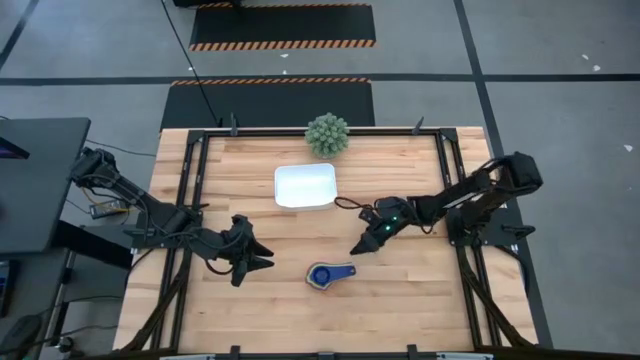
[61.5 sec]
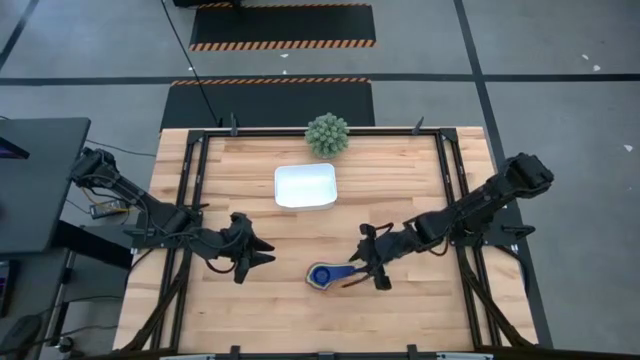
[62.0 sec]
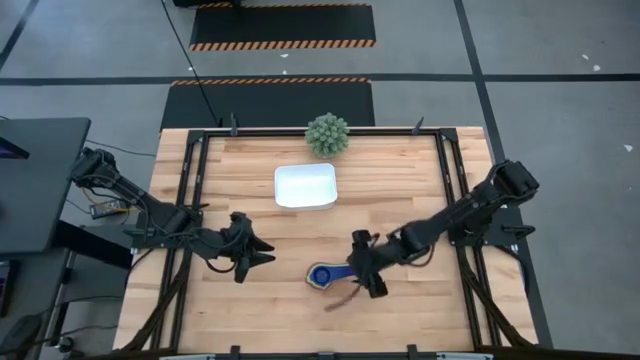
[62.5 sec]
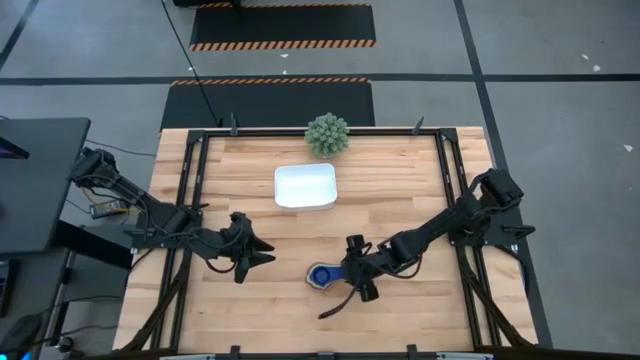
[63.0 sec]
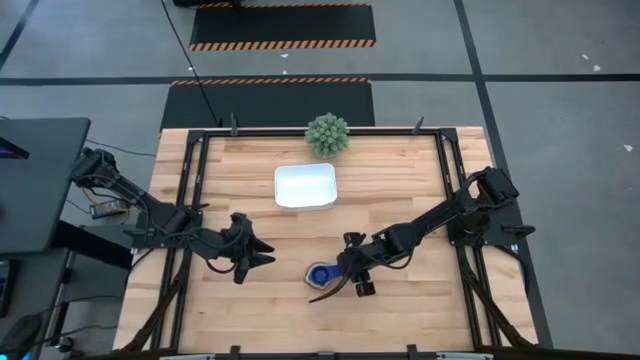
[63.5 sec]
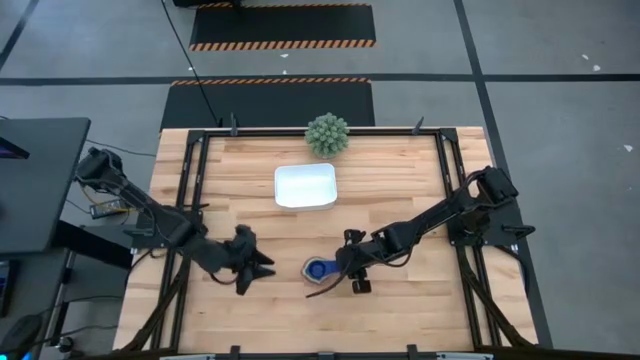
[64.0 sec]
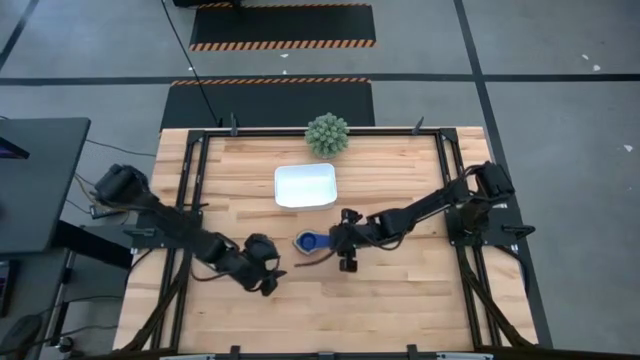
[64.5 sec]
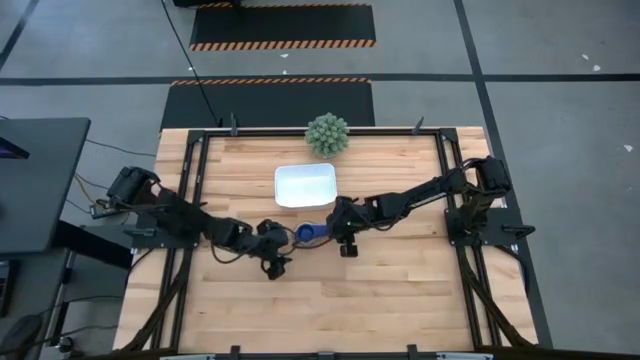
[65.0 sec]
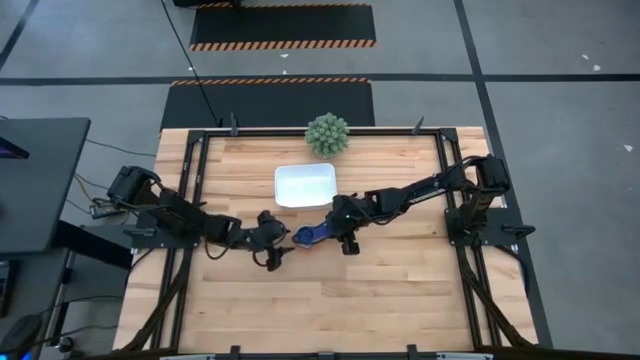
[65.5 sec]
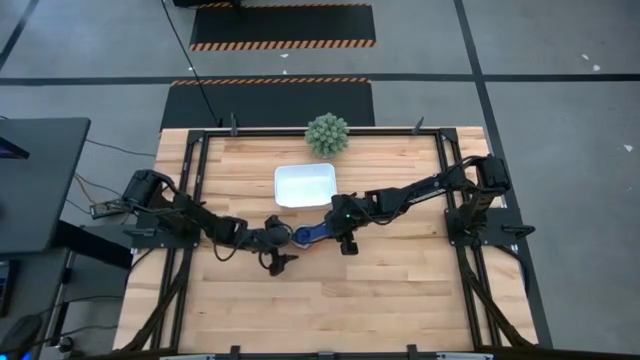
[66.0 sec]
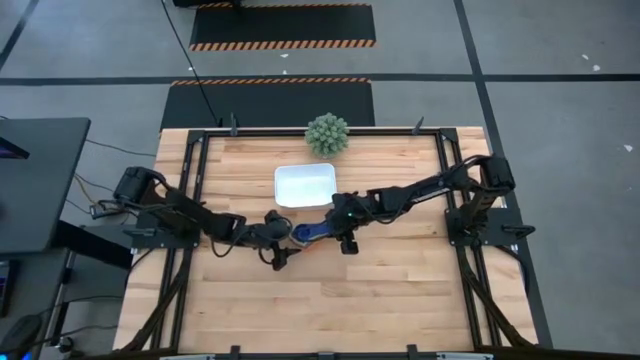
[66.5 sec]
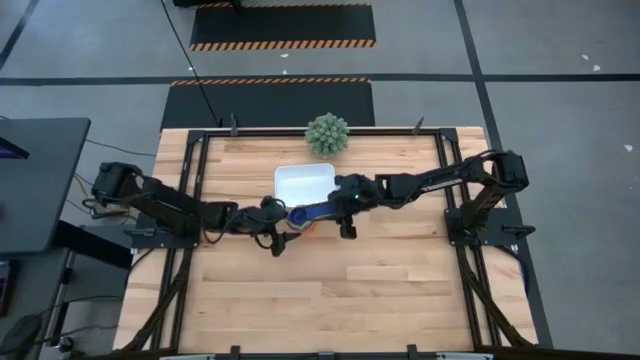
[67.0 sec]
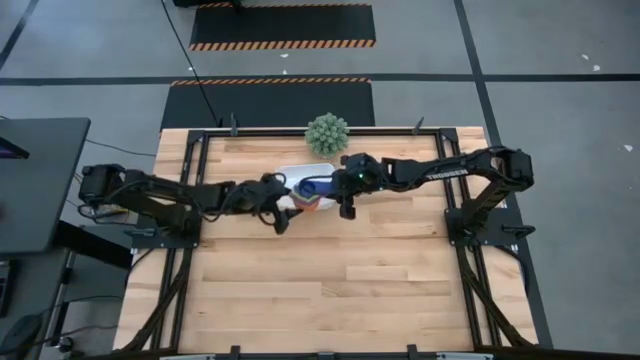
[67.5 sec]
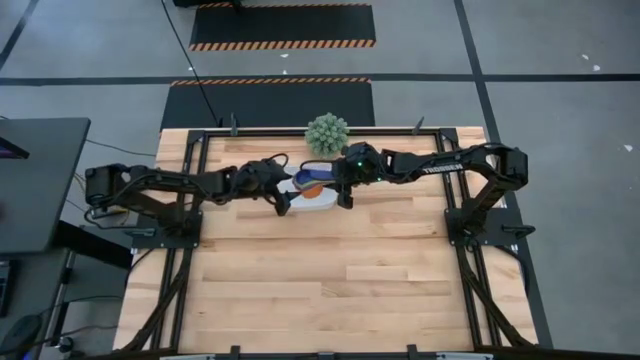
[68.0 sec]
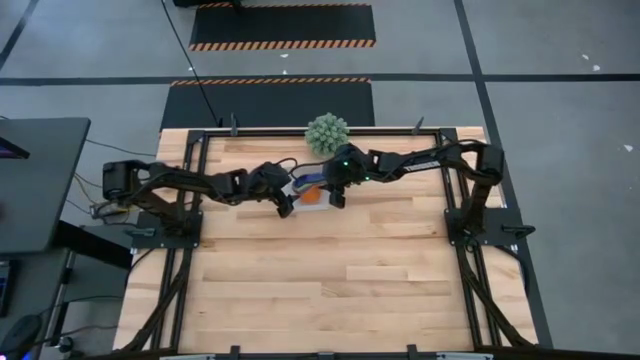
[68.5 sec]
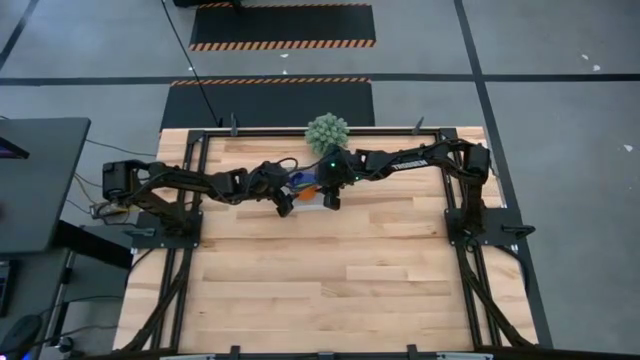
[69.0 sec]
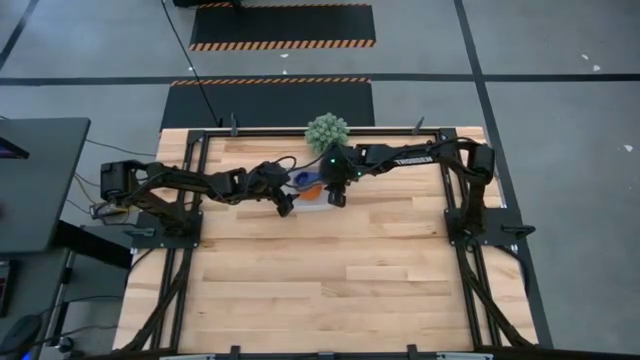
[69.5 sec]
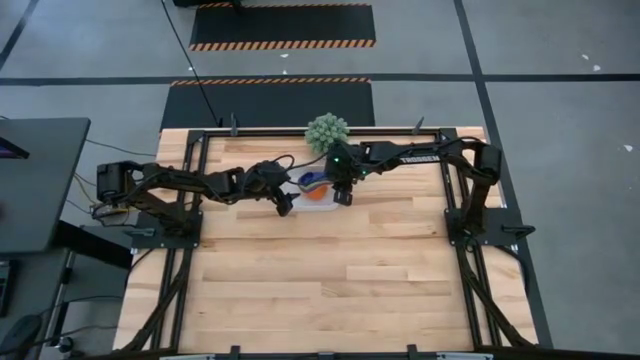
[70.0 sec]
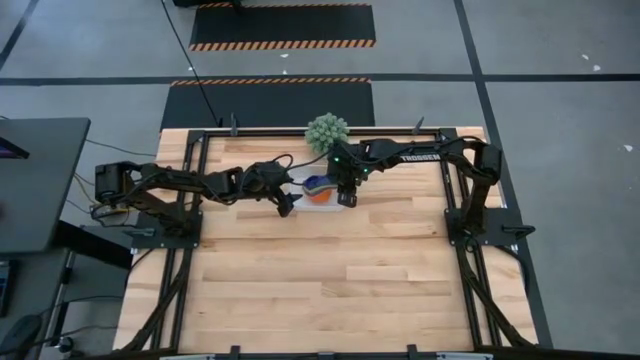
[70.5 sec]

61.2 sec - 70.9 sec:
Task: Nest measuring cups in basket
Put the stacked measuring cups into the bin

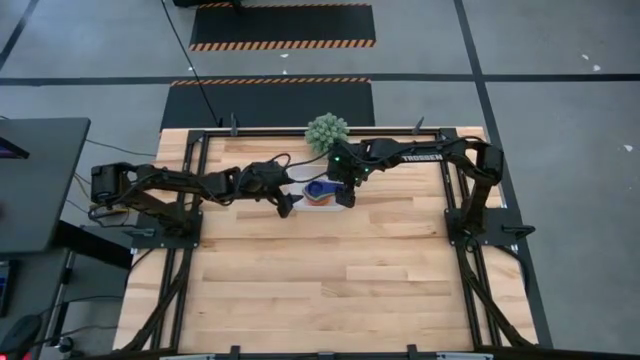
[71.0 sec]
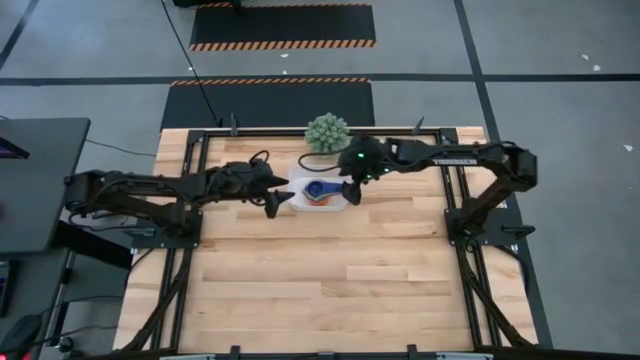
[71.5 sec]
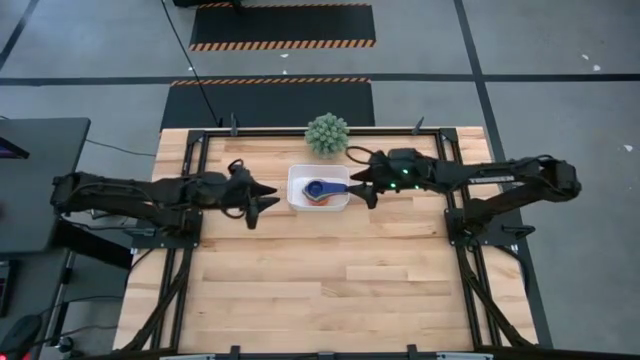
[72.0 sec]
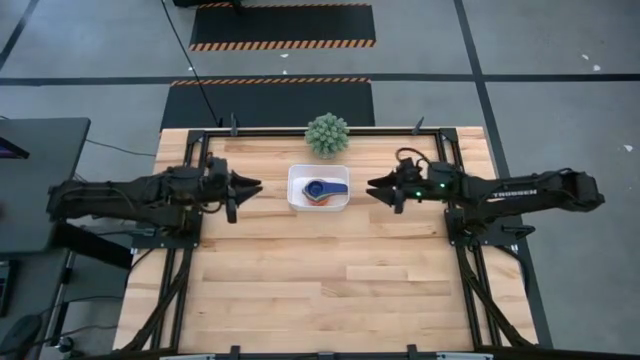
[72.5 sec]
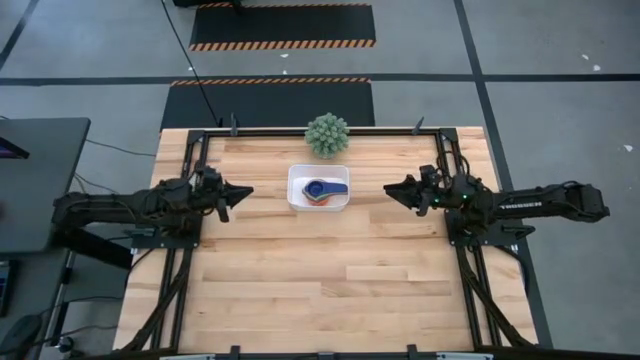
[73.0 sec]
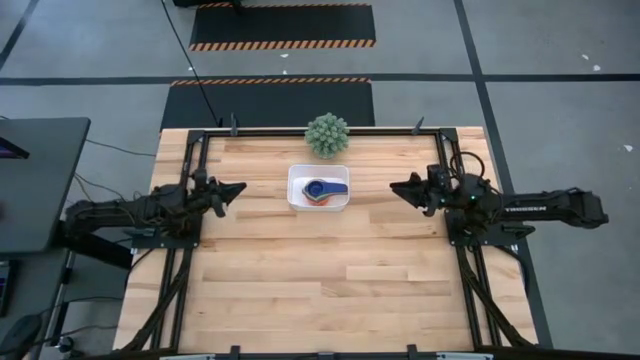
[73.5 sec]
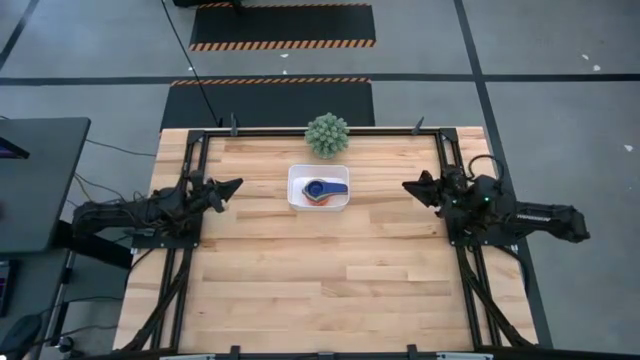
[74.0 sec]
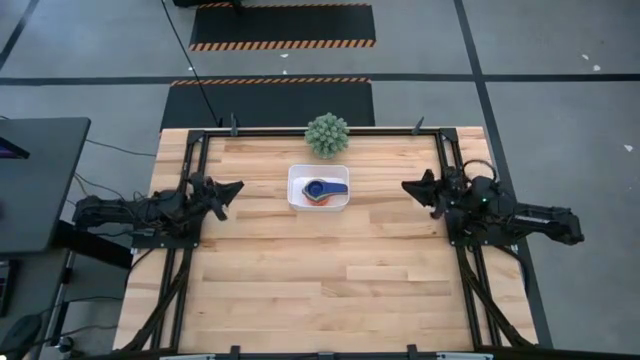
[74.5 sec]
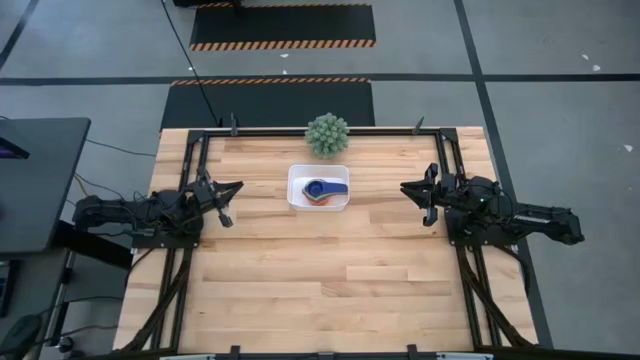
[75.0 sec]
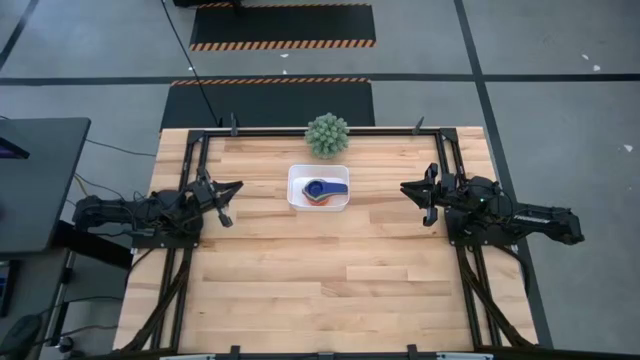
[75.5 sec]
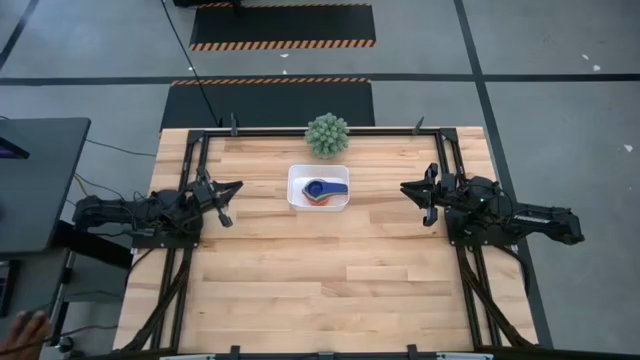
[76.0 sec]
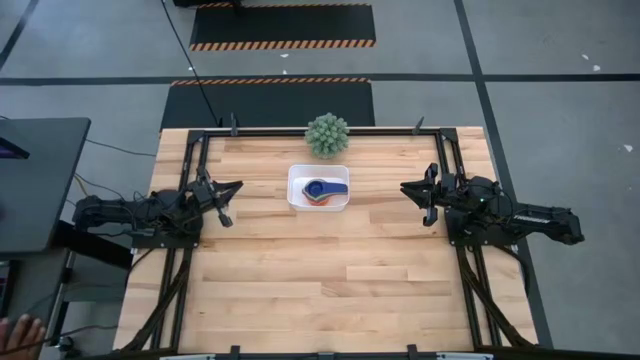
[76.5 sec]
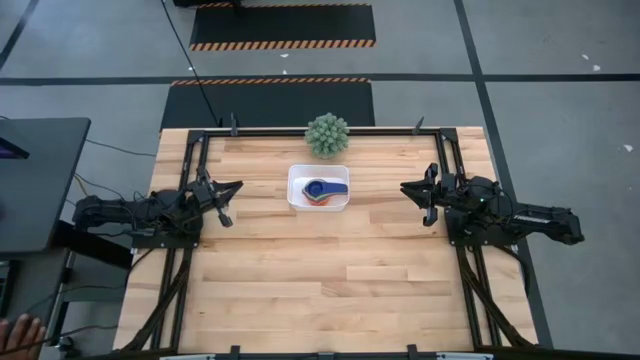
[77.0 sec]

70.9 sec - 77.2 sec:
Return to Home Position

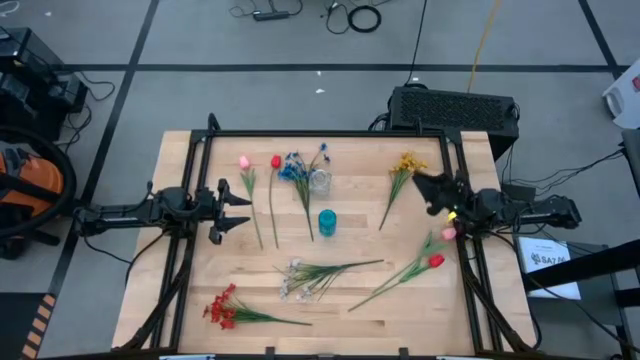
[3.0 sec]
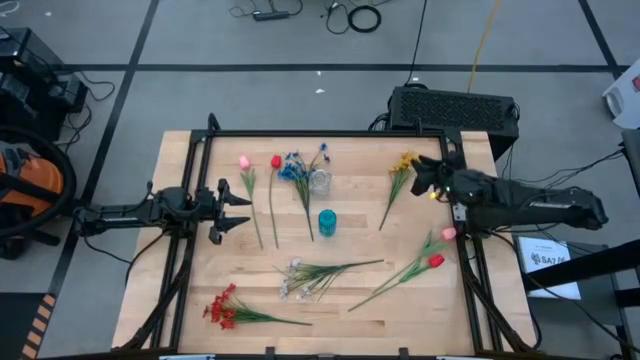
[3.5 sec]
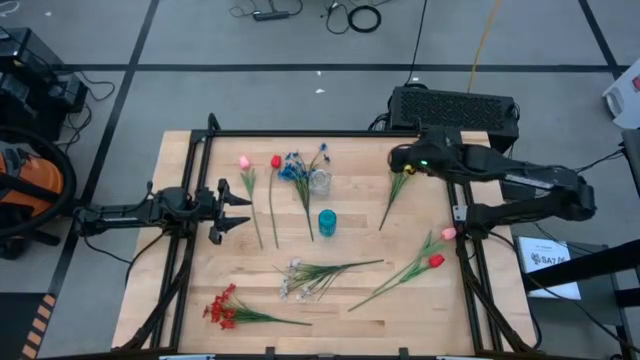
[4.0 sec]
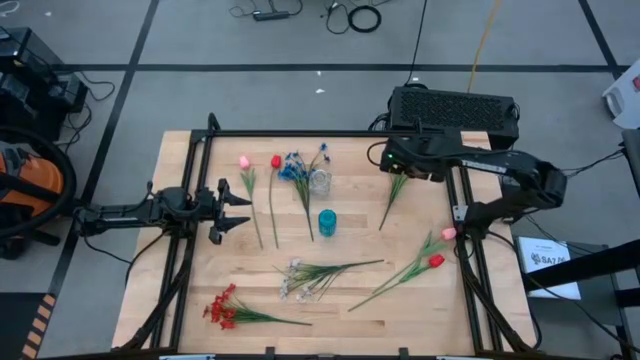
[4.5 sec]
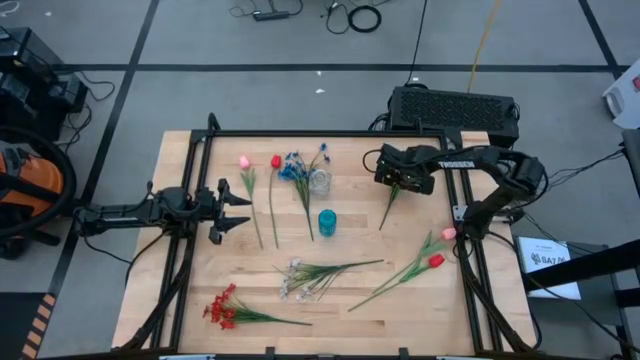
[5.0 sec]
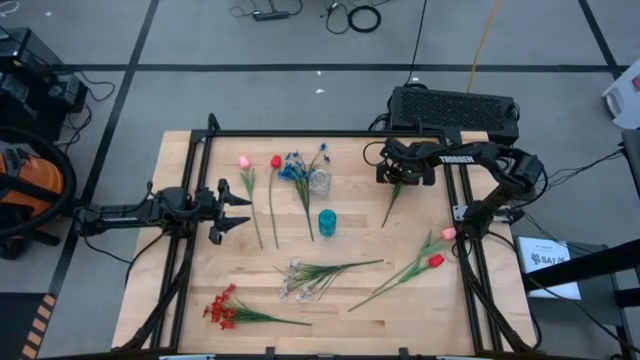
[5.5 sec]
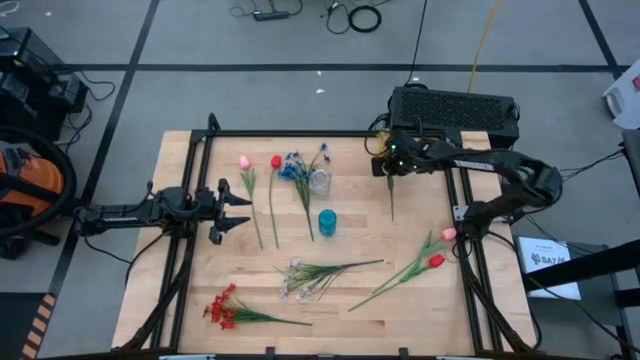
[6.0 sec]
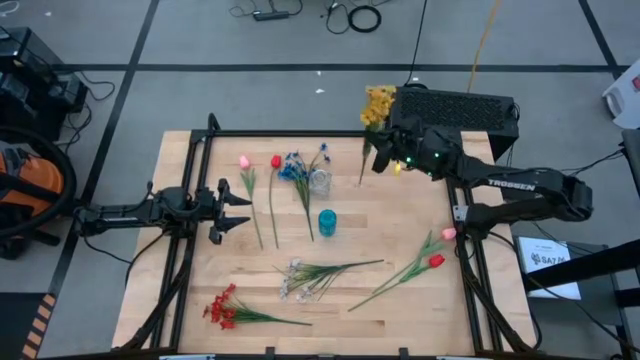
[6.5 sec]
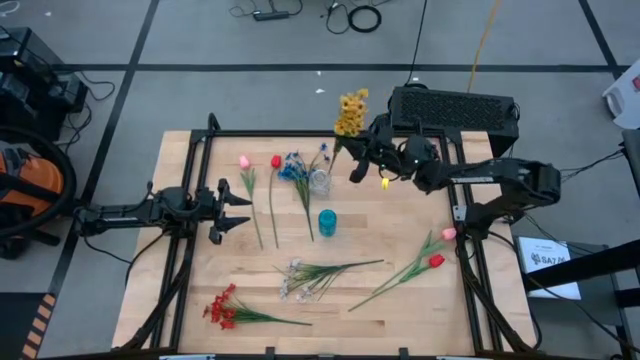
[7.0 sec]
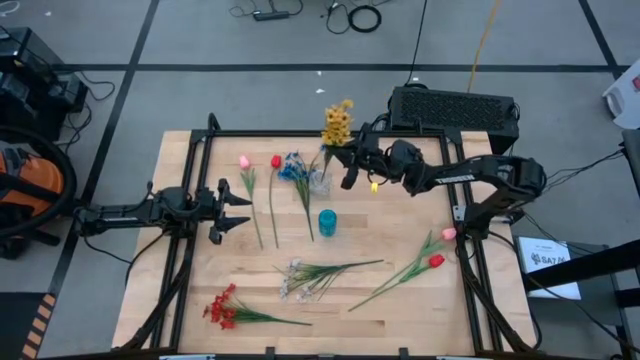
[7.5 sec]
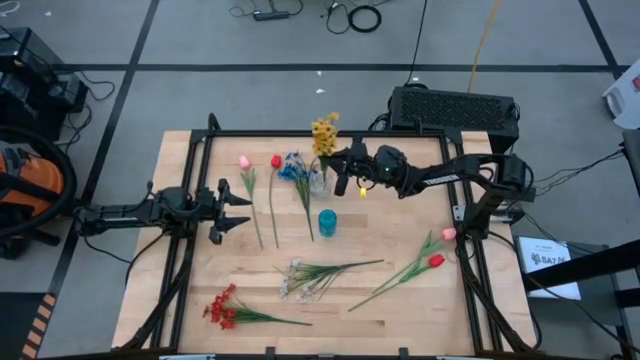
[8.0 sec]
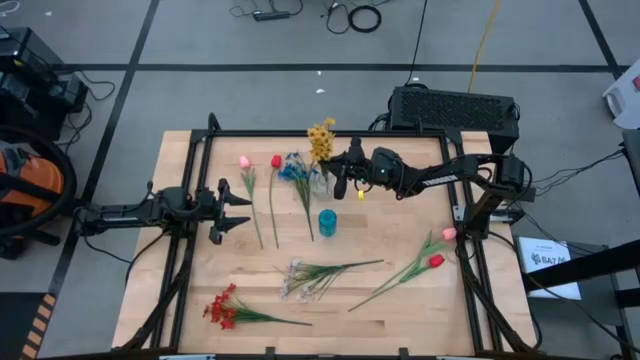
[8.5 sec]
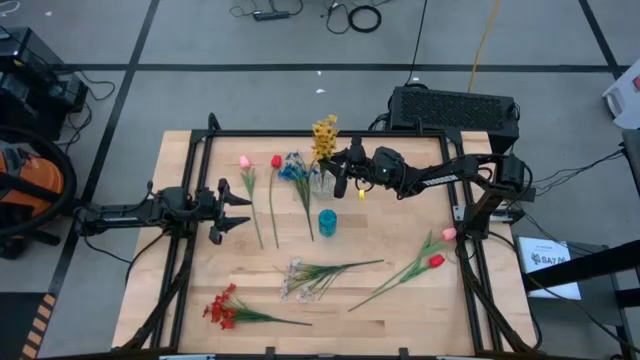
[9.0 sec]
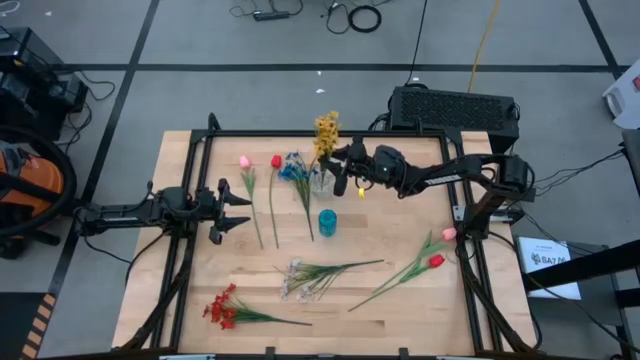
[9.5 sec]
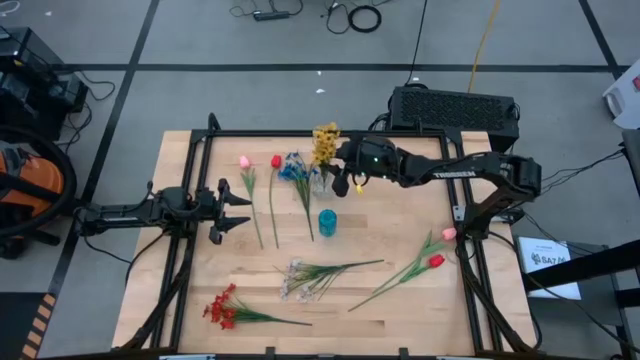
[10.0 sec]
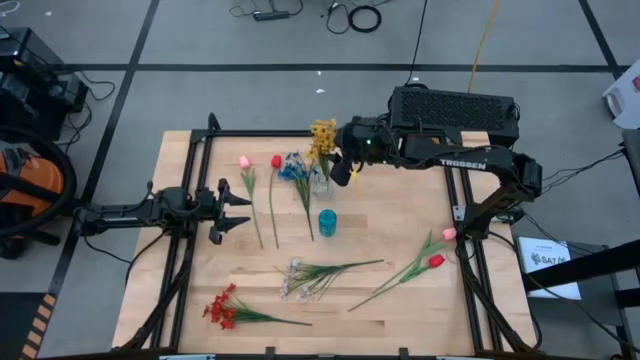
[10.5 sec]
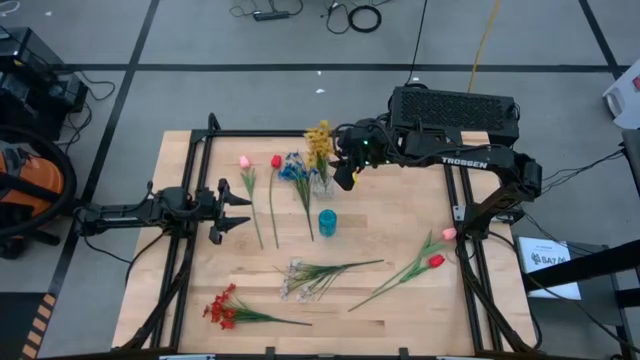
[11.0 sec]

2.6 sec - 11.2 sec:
Task: Sort flowers into vase by color
Put the yellow flowers into the transparent vase
